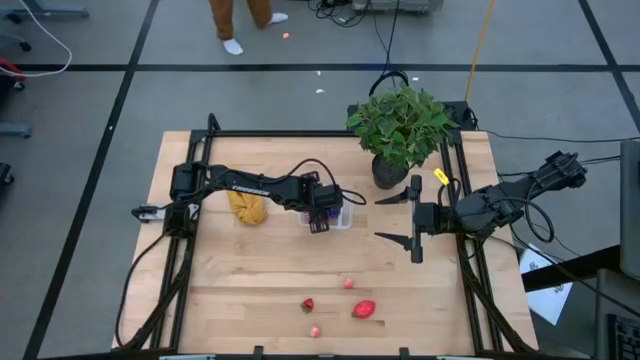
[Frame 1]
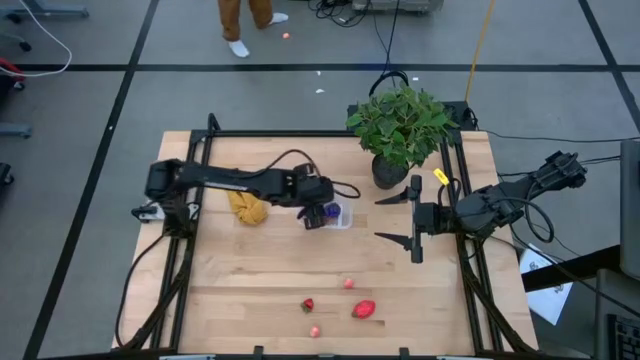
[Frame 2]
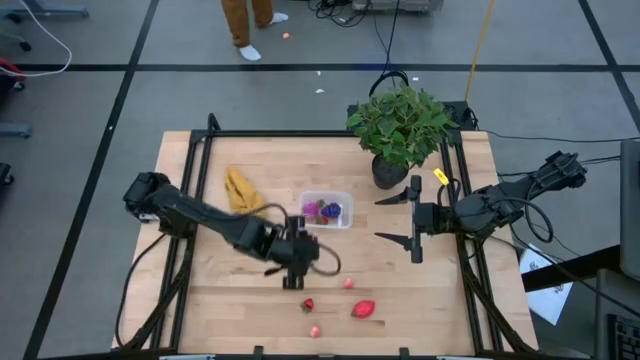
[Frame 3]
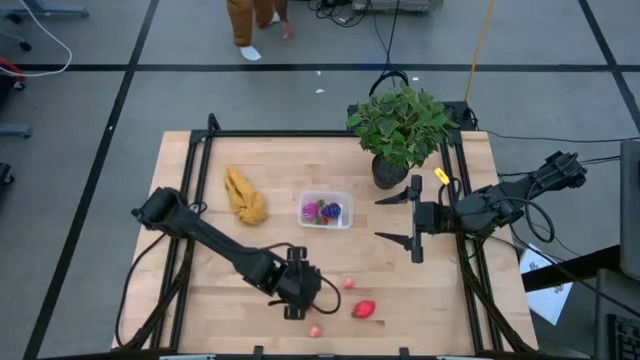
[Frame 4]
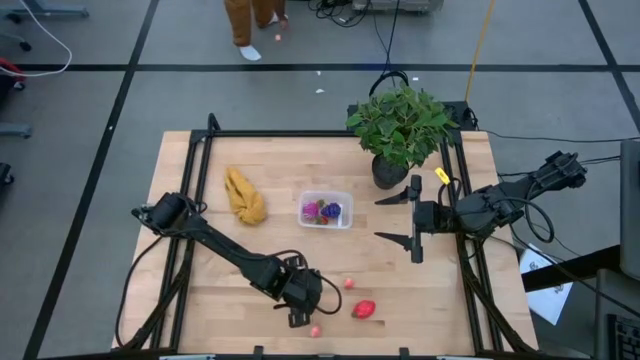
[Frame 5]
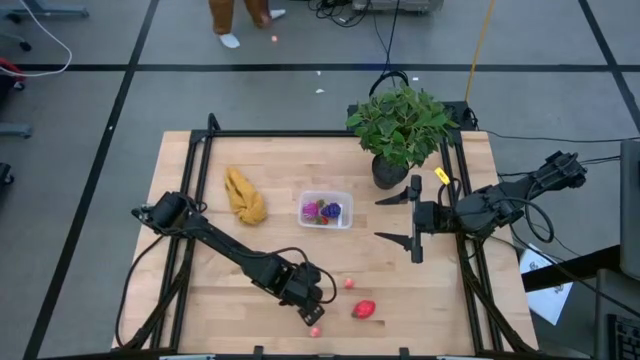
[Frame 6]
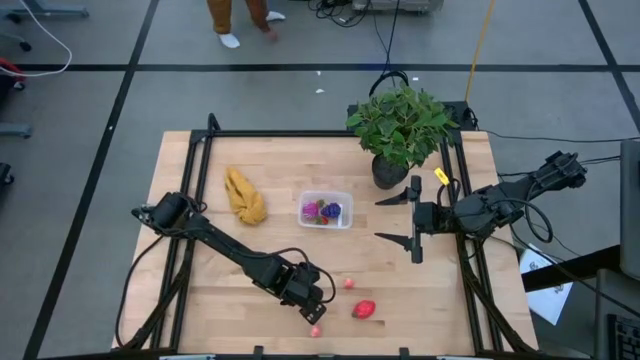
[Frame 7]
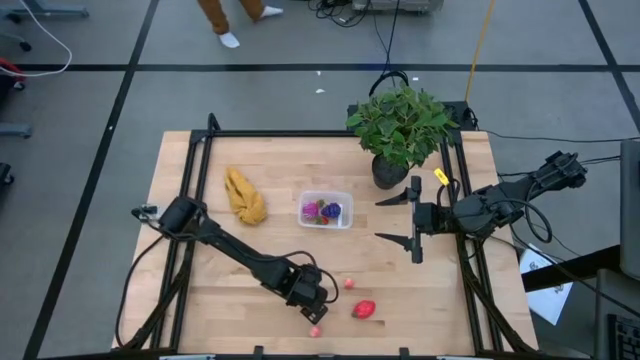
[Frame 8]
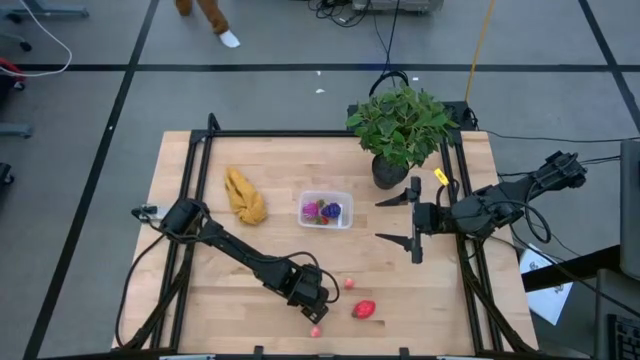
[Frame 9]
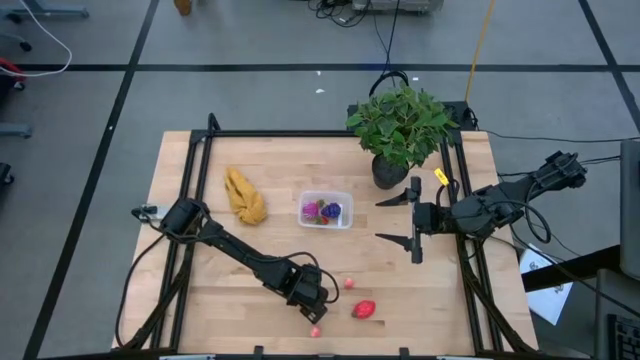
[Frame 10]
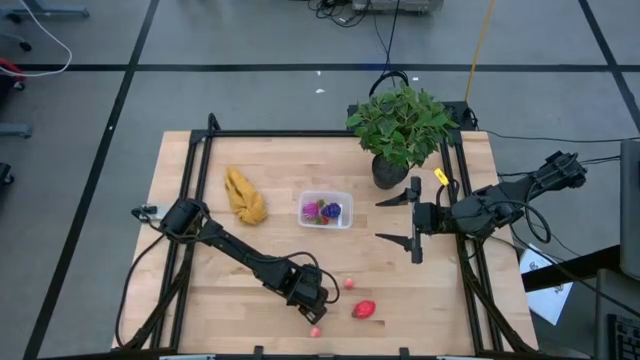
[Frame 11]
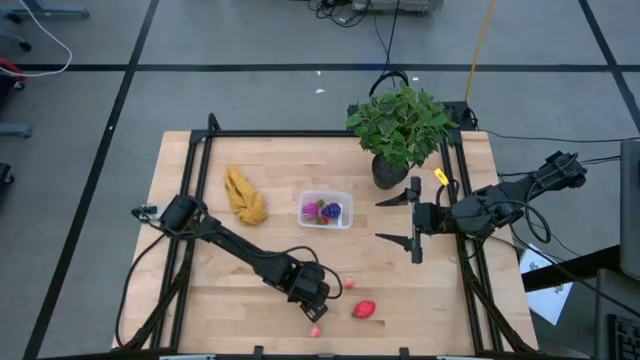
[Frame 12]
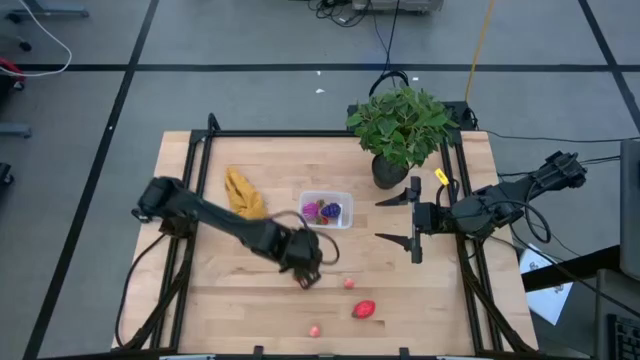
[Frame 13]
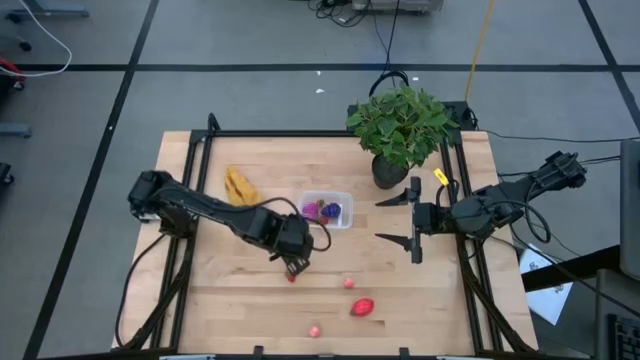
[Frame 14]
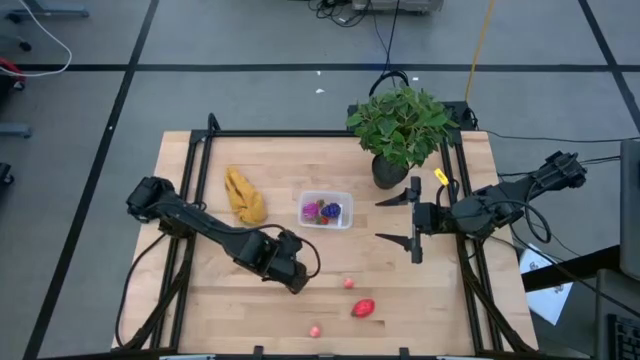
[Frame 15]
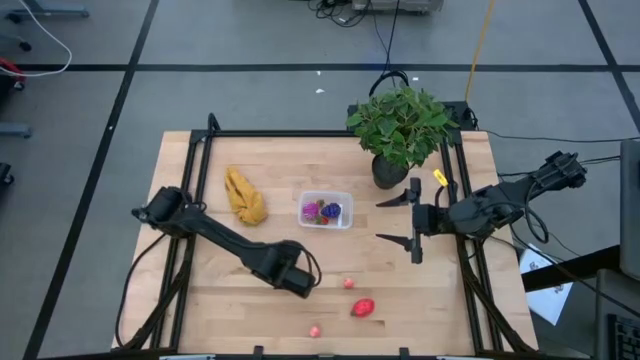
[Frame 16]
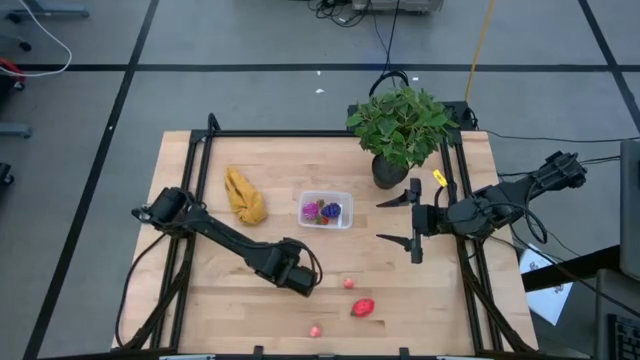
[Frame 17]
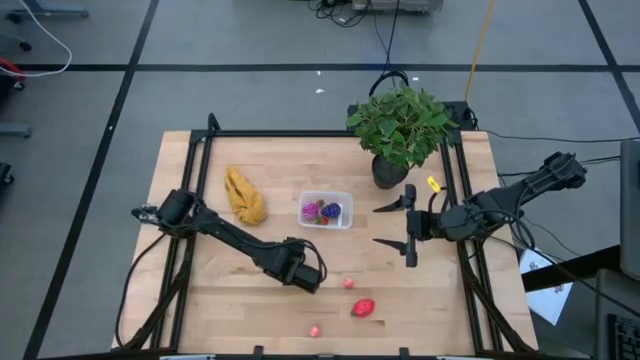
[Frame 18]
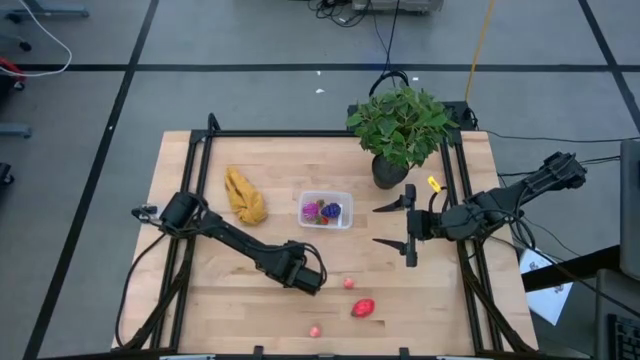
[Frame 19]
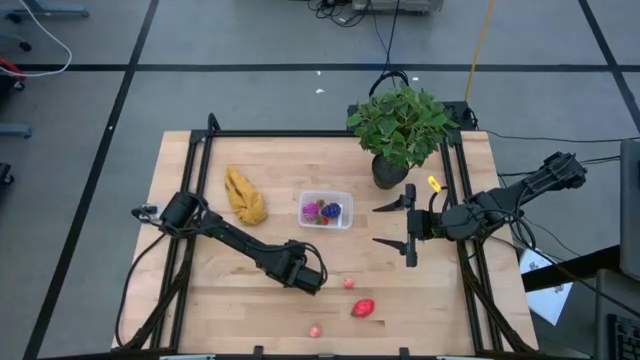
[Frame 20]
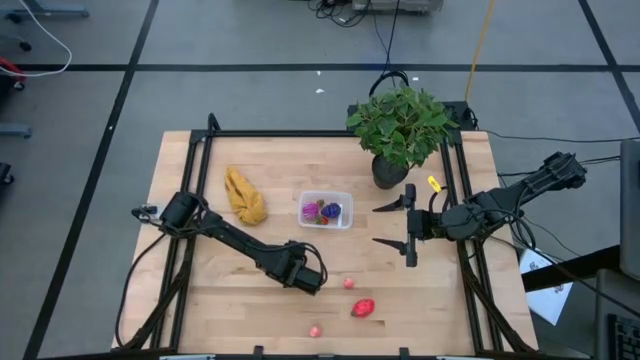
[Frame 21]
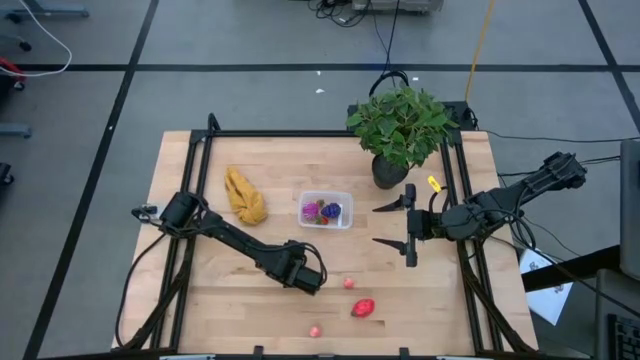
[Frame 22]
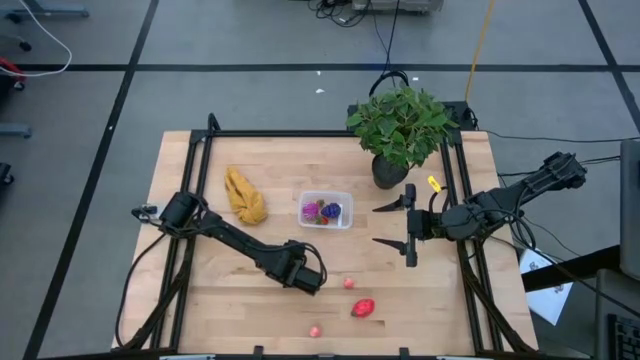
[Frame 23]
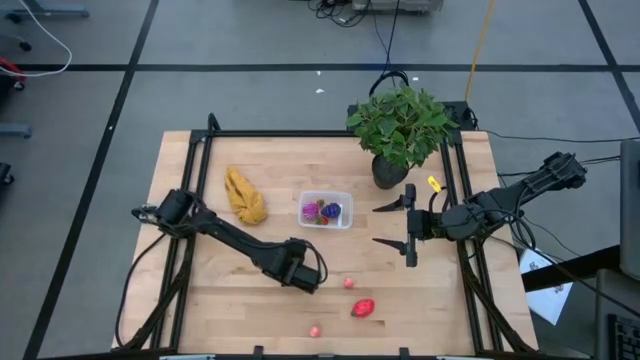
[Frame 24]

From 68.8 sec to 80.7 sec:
Task: Pick and placing Produce into tupperware
Put the red strawberry into the transparent bin

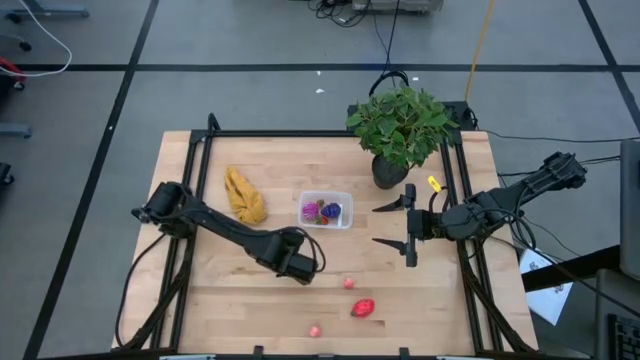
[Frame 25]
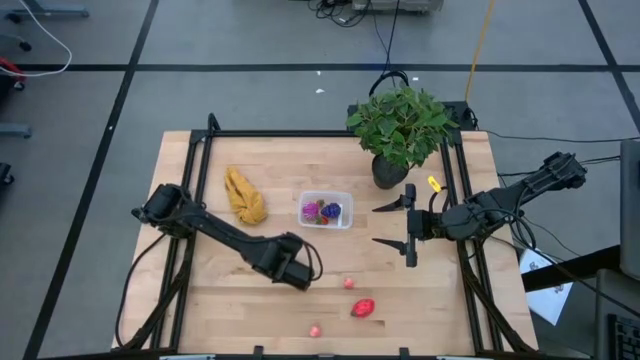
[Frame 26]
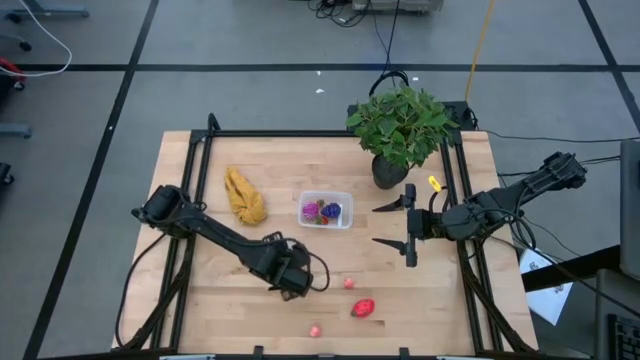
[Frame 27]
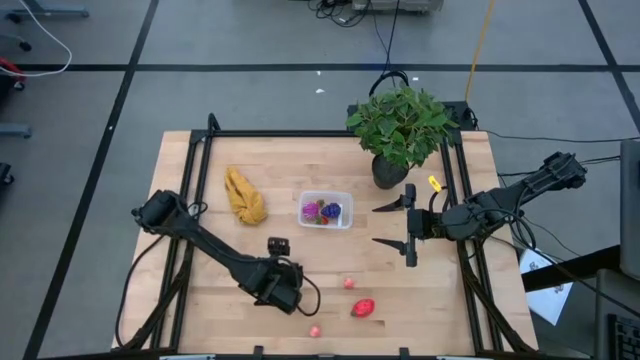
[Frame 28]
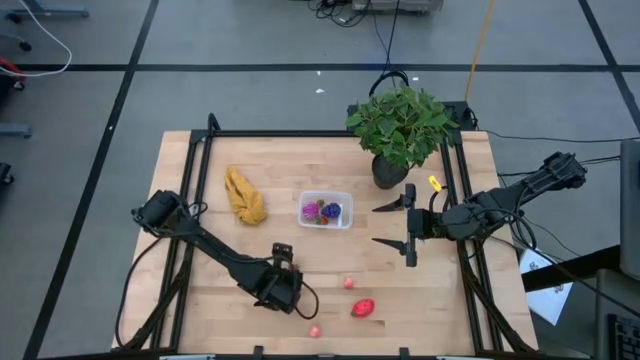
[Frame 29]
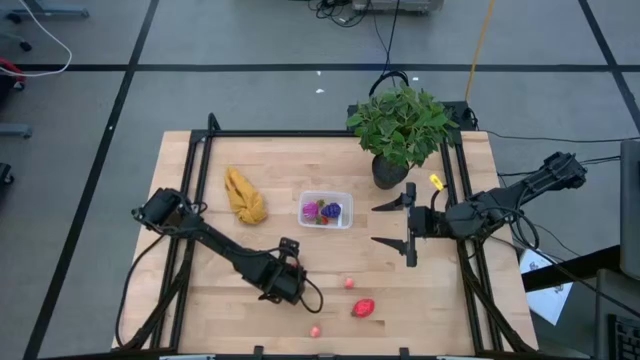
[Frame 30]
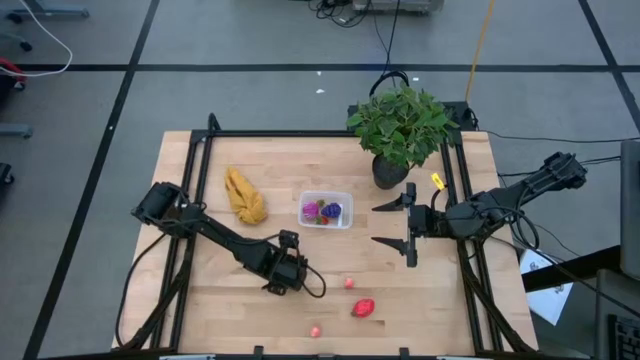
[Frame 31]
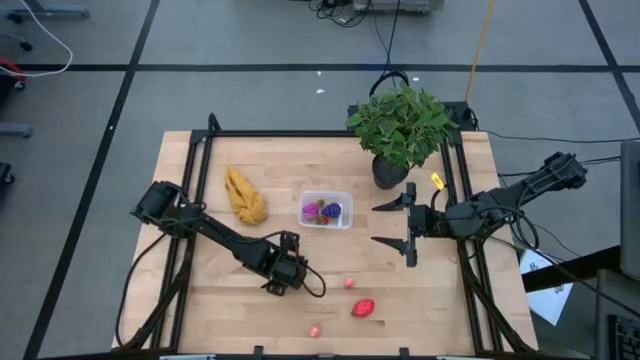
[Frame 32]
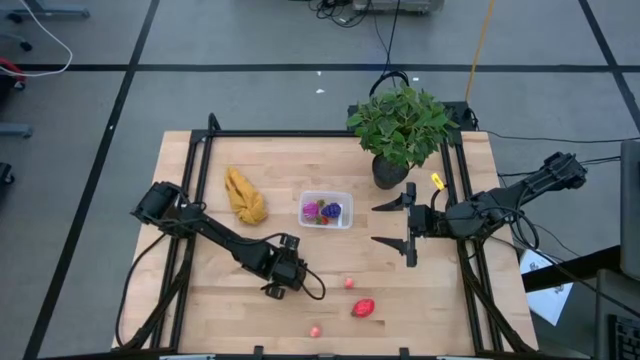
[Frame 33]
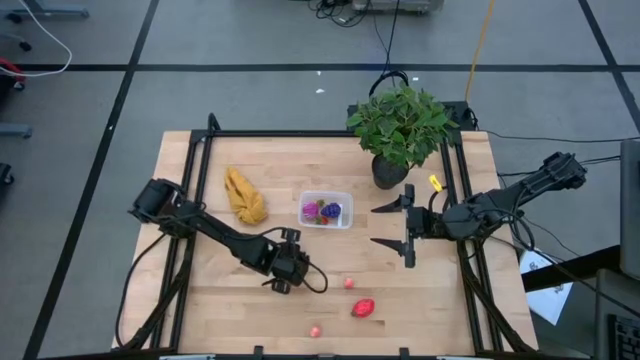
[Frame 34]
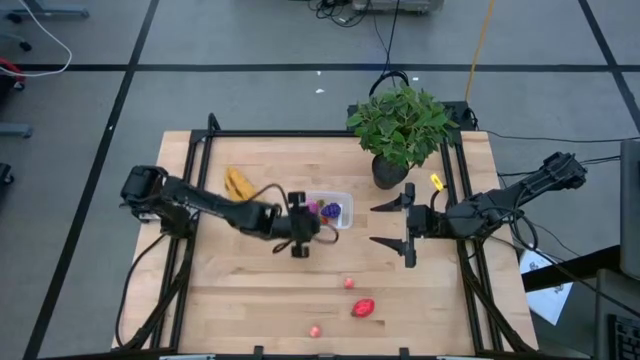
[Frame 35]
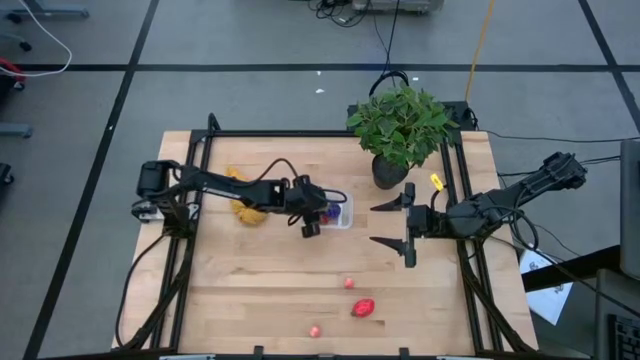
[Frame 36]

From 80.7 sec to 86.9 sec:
Put the red strawberry into the transparent bin

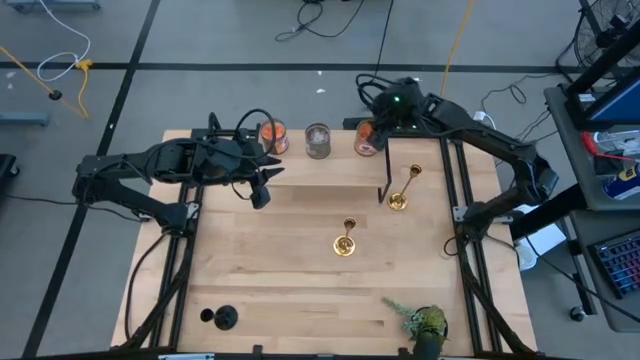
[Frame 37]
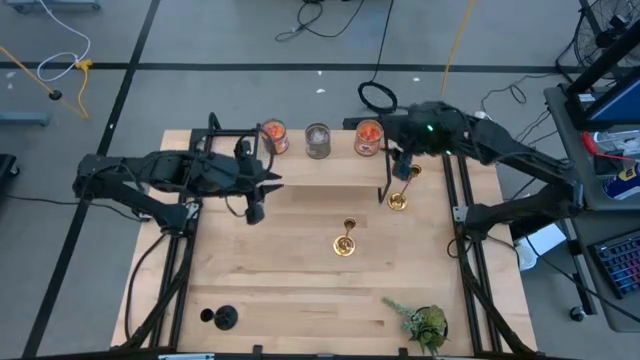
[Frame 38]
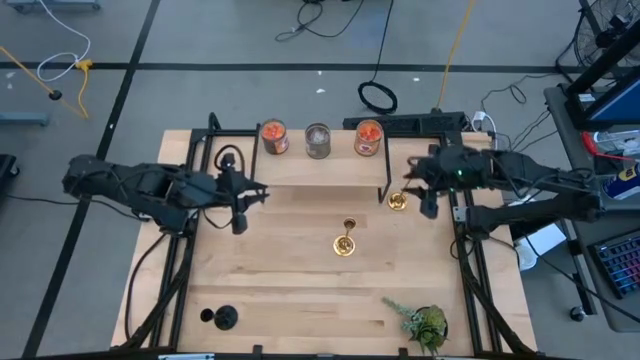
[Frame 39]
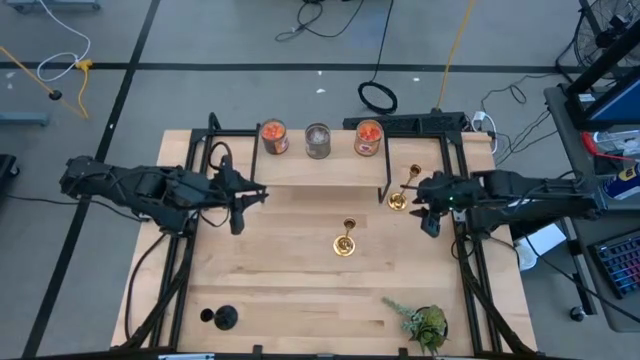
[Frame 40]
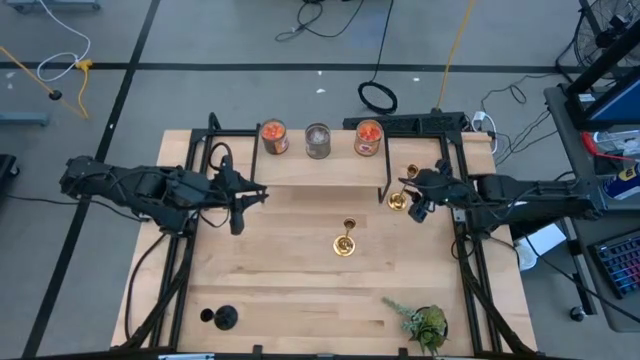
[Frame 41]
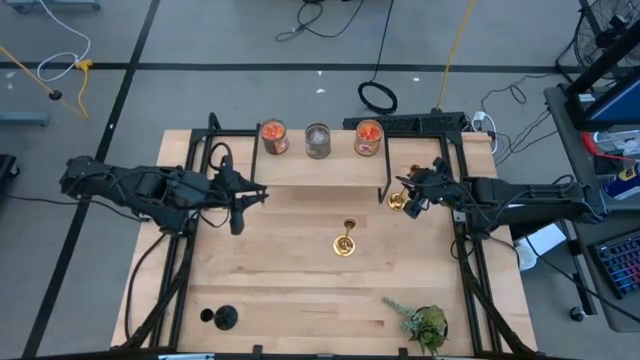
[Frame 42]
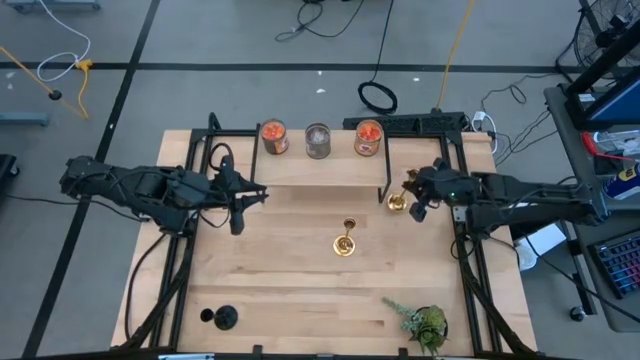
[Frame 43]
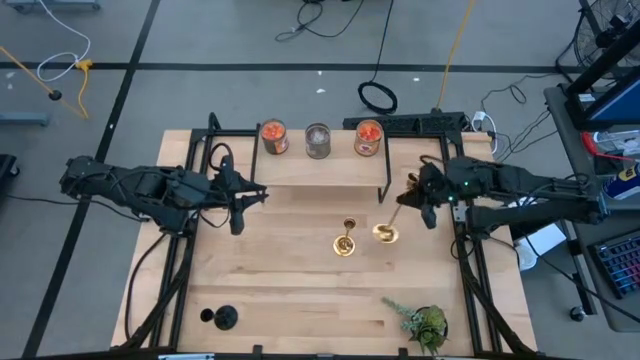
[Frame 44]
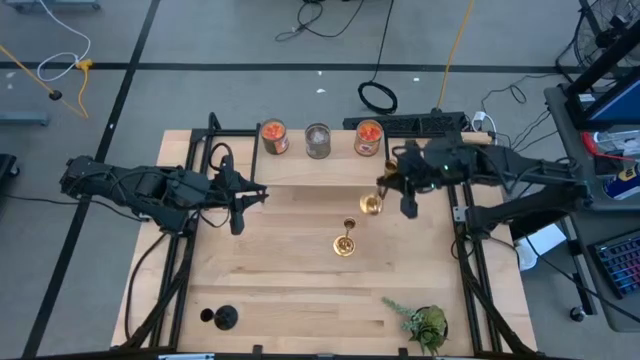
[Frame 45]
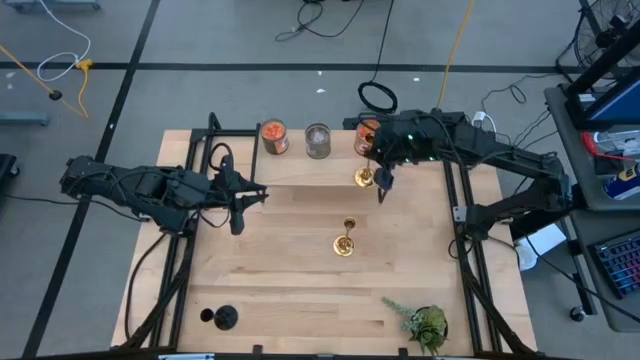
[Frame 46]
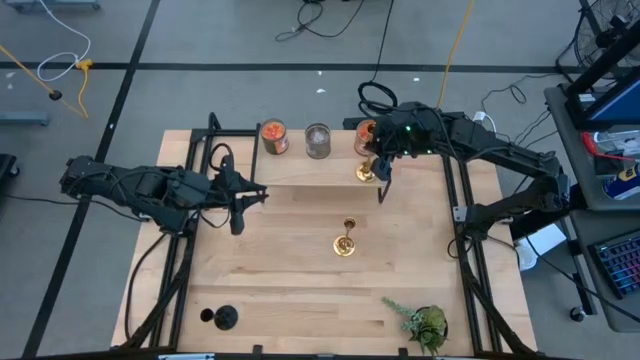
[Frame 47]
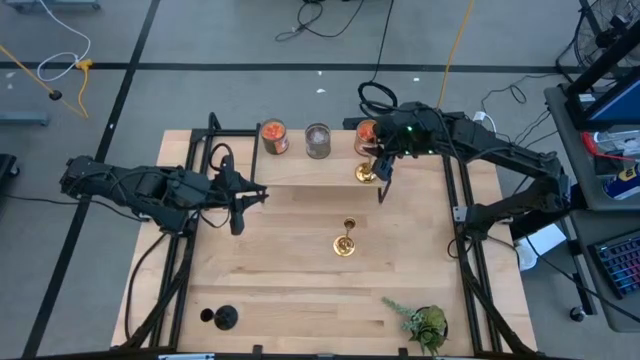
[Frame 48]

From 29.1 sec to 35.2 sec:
Task: Pick & Place candle stick holders
Put the top brown candle holder on the shelf
